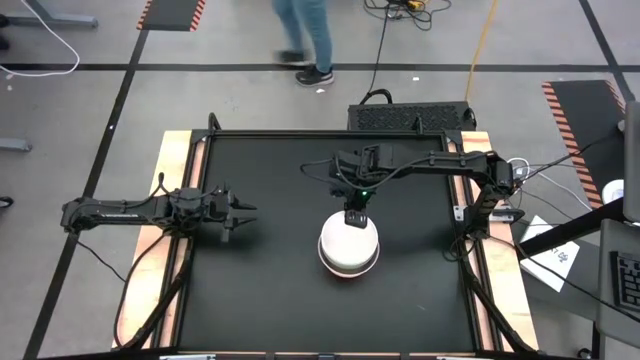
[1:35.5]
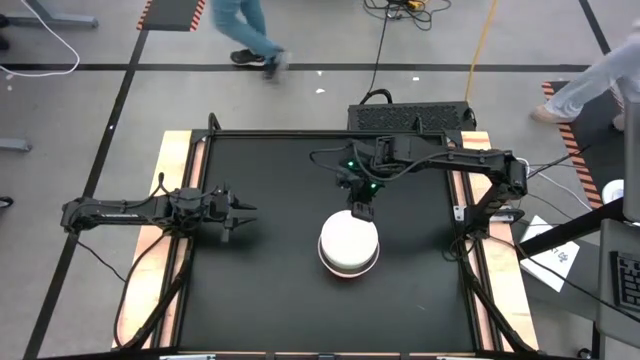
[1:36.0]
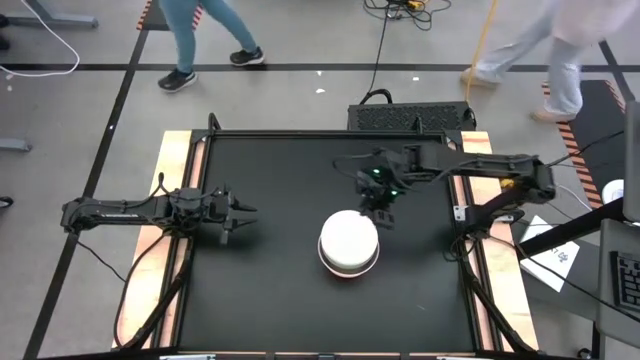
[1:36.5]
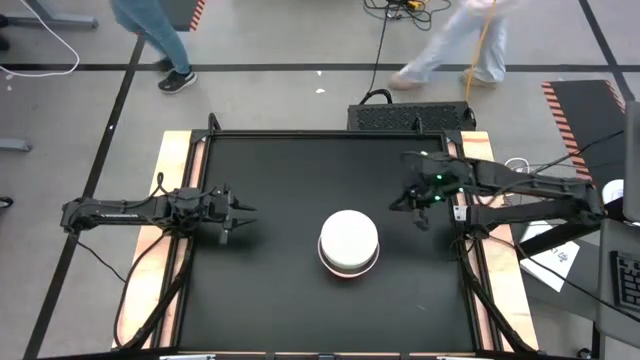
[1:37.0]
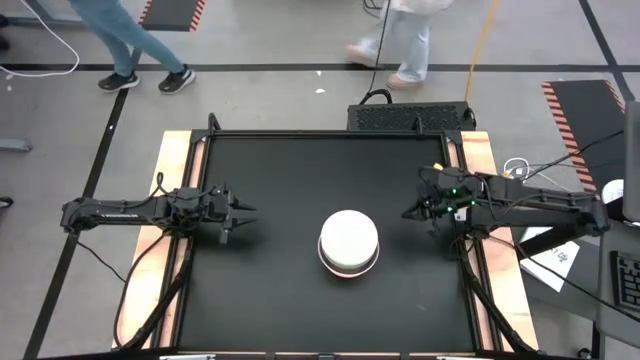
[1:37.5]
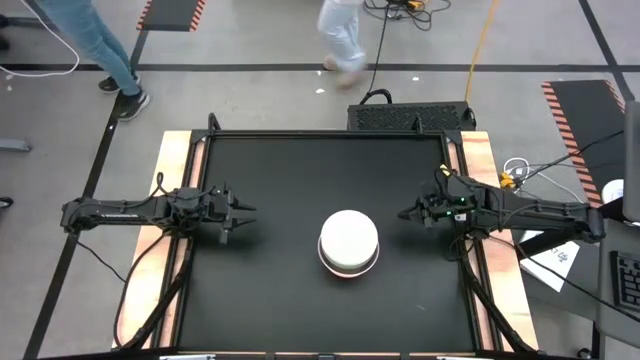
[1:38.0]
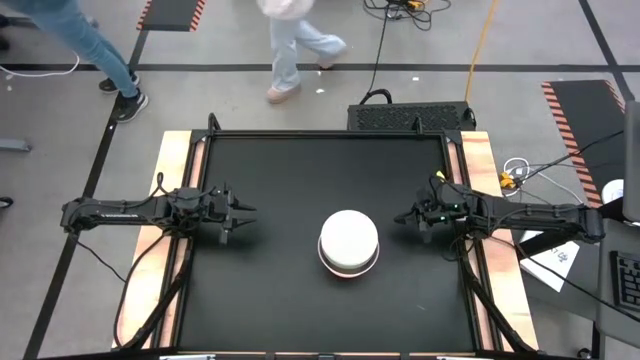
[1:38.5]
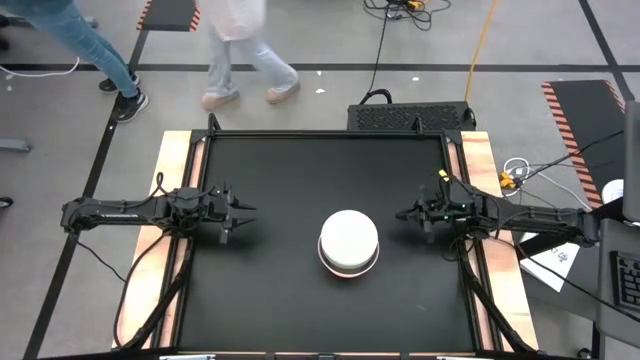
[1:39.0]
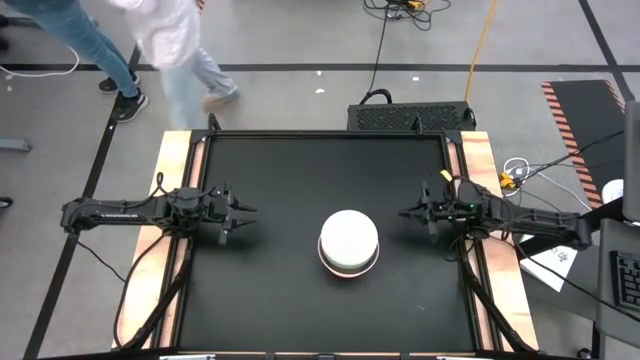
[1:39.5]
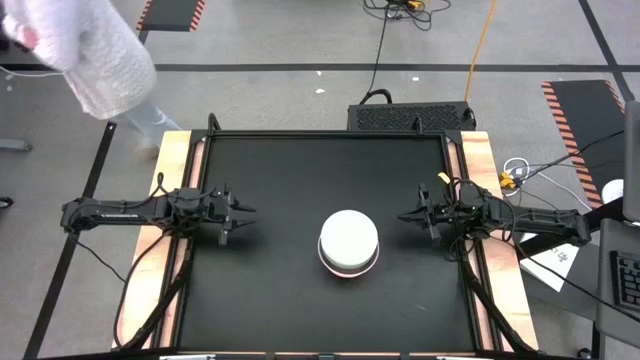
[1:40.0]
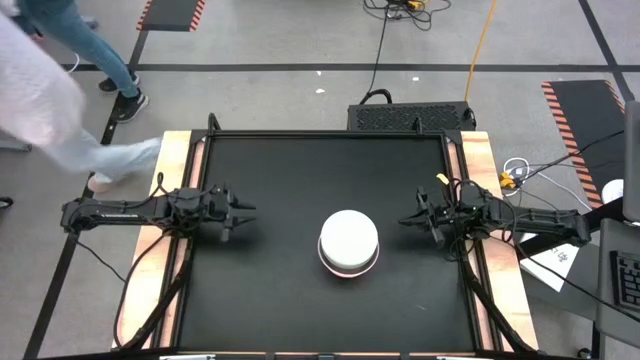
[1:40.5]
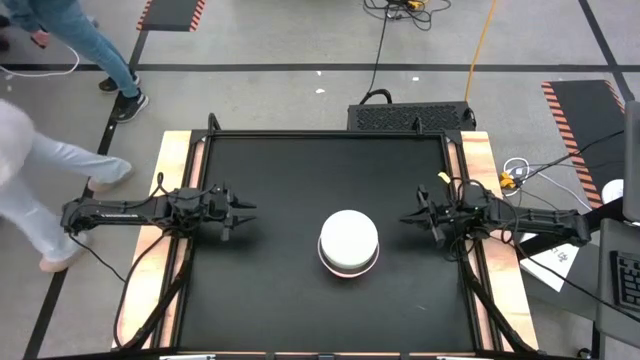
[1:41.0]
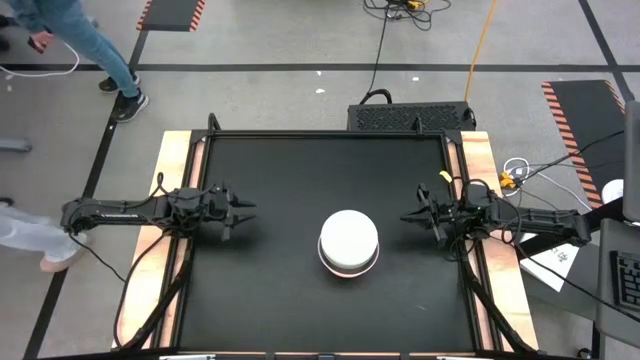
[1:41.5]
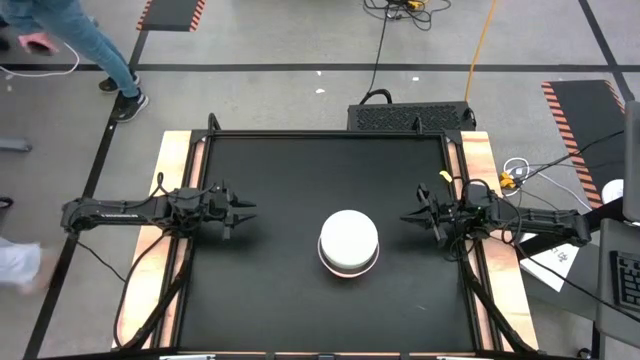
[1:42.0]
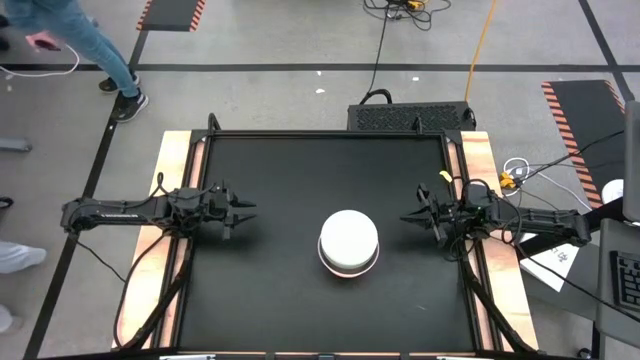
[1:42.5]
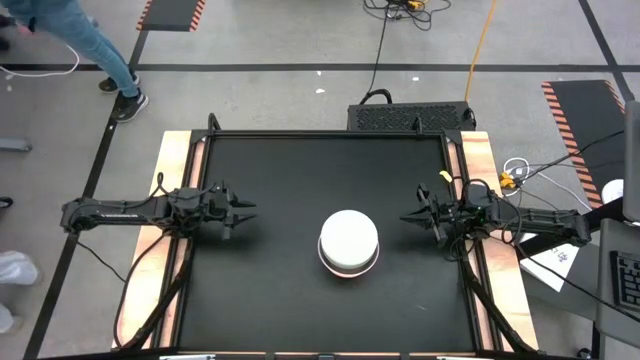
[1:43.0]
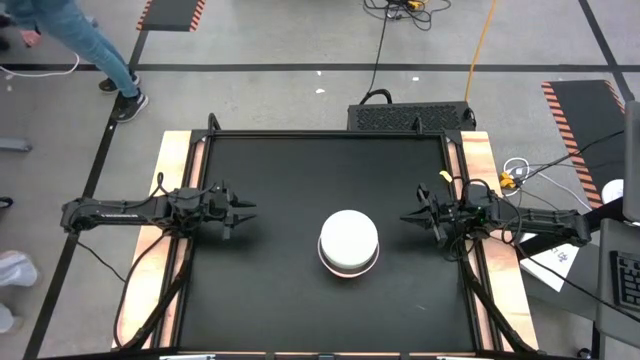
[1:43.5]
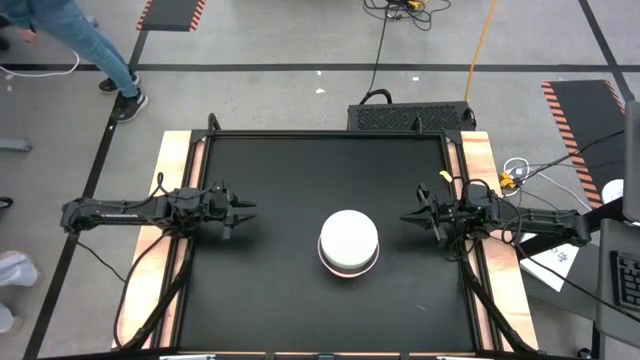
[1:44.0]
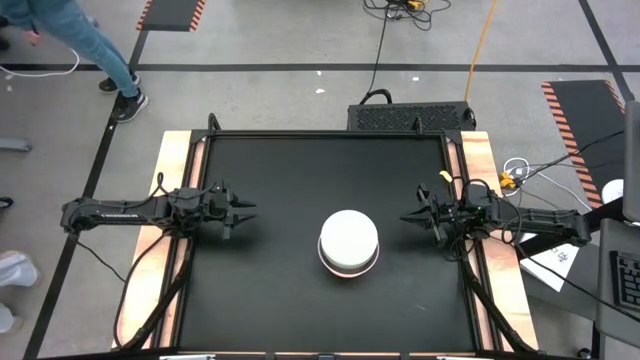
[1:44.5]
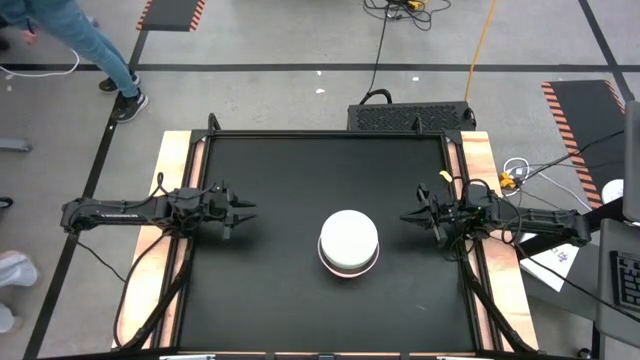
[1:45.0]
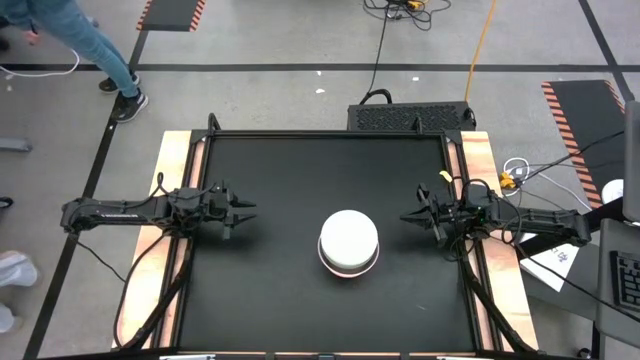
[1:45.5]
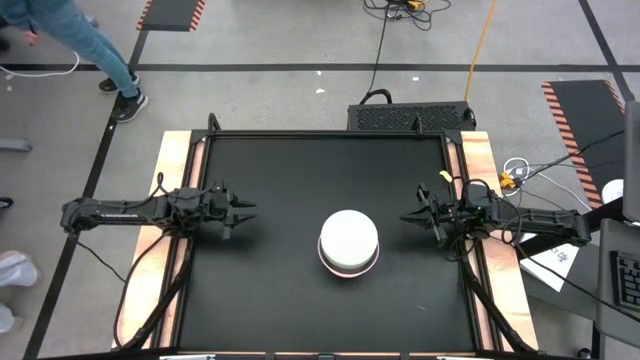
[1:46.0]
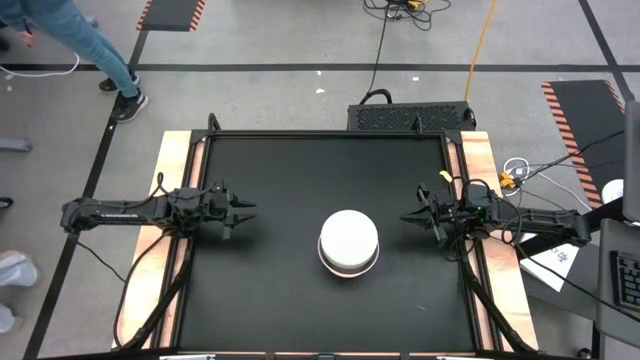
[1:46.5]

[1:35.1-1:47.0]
Task: Nest bowls inside each other
Return to Home Position
